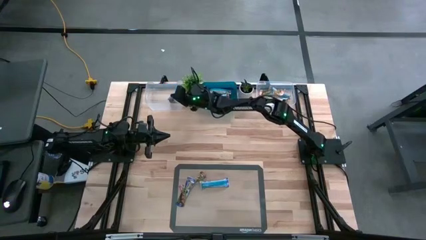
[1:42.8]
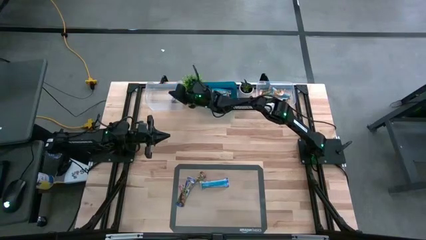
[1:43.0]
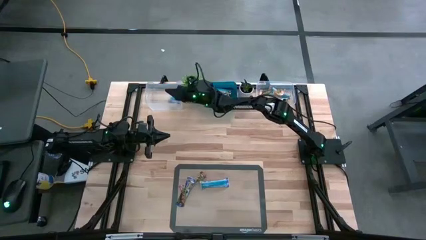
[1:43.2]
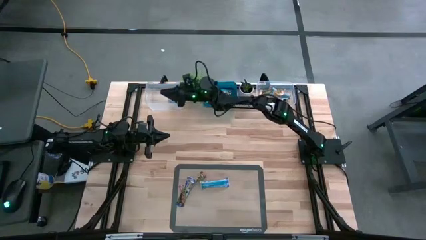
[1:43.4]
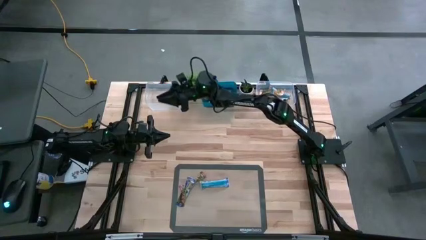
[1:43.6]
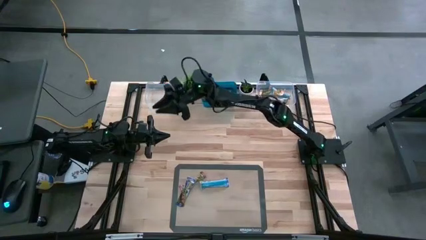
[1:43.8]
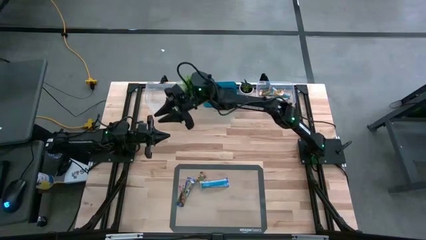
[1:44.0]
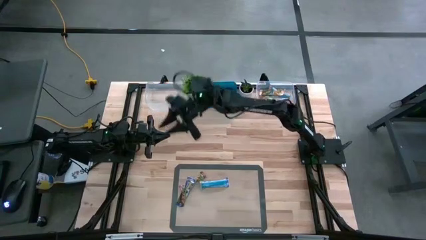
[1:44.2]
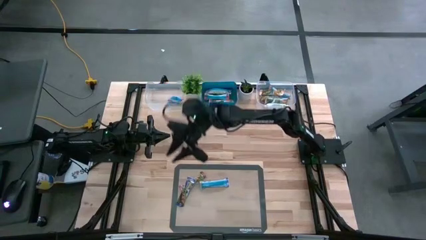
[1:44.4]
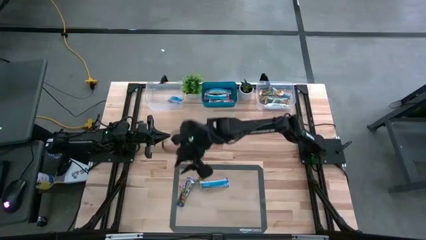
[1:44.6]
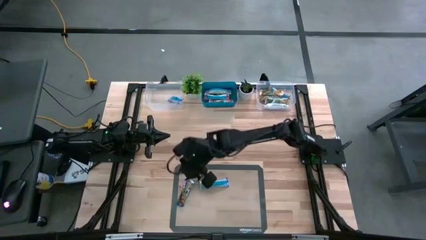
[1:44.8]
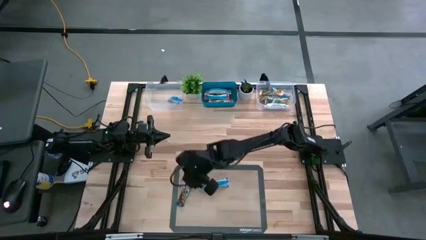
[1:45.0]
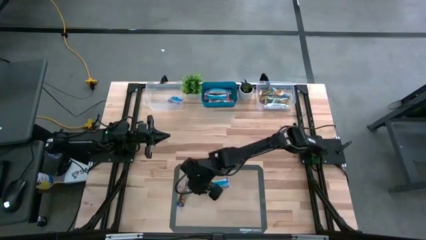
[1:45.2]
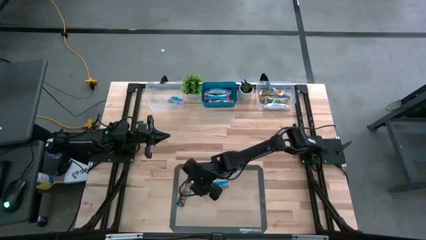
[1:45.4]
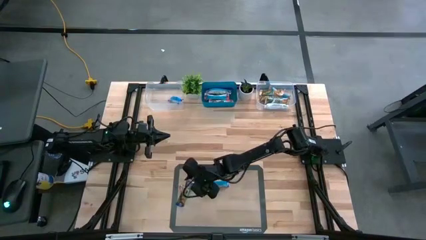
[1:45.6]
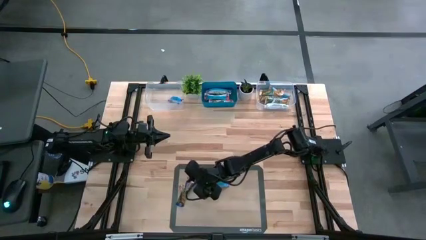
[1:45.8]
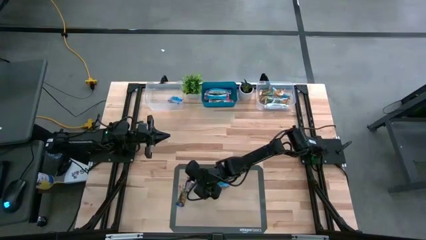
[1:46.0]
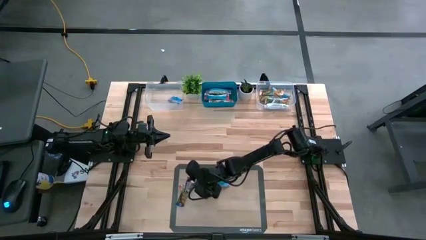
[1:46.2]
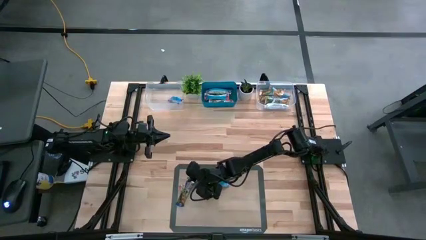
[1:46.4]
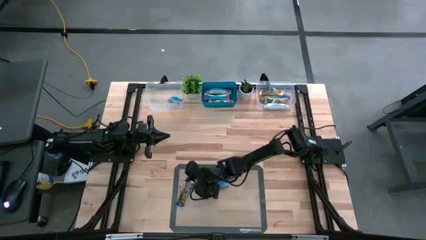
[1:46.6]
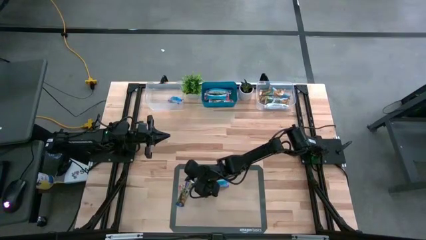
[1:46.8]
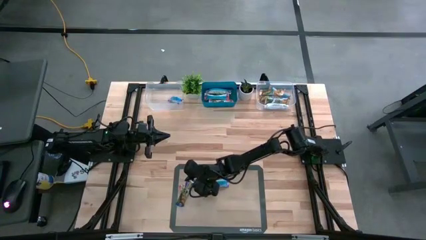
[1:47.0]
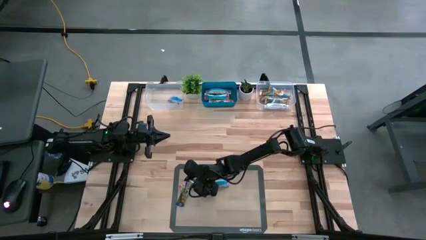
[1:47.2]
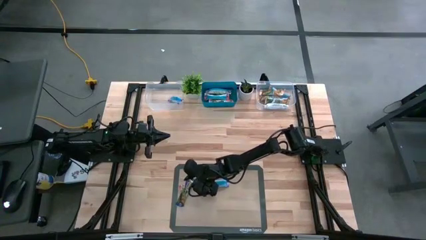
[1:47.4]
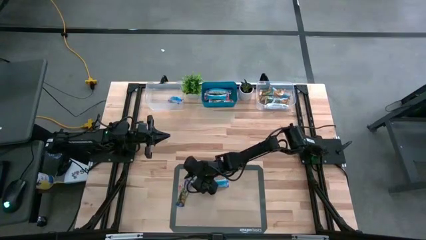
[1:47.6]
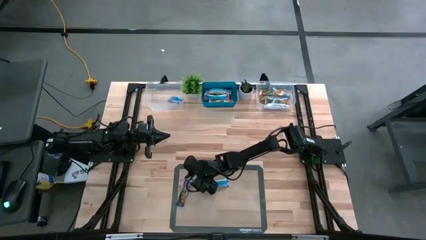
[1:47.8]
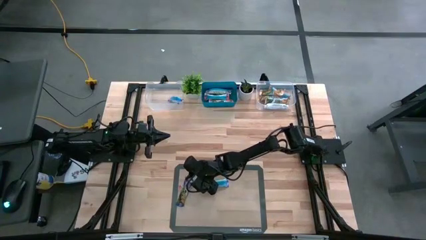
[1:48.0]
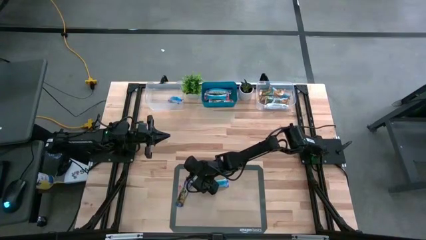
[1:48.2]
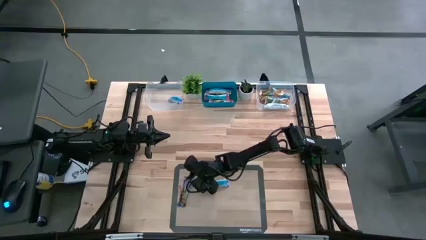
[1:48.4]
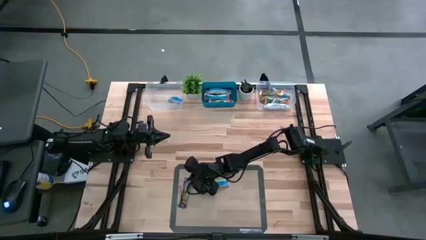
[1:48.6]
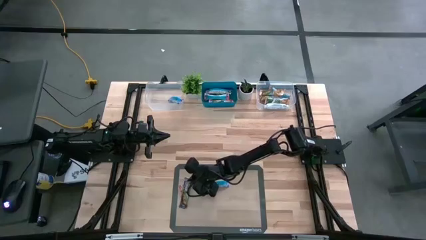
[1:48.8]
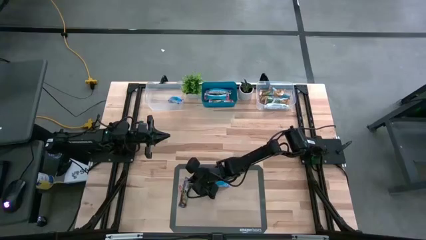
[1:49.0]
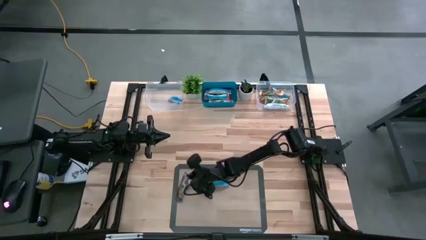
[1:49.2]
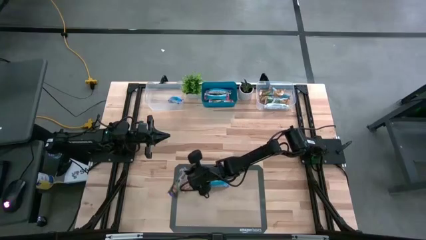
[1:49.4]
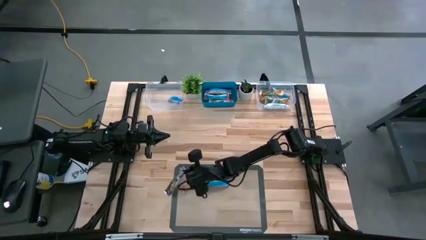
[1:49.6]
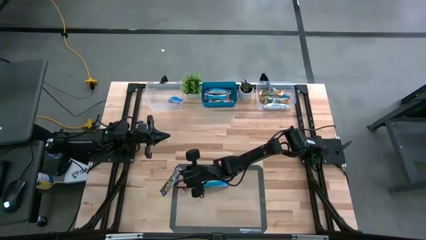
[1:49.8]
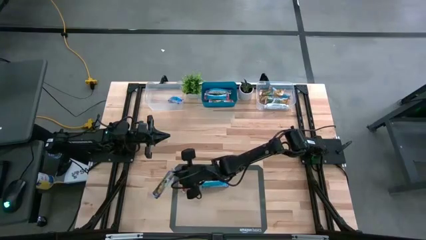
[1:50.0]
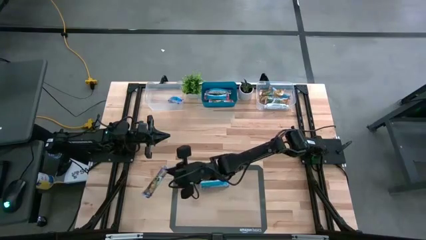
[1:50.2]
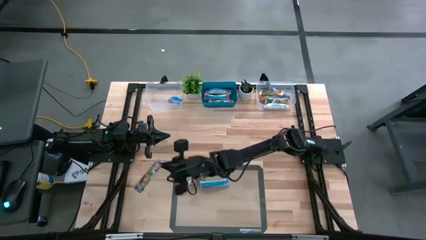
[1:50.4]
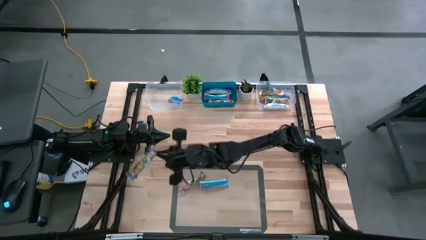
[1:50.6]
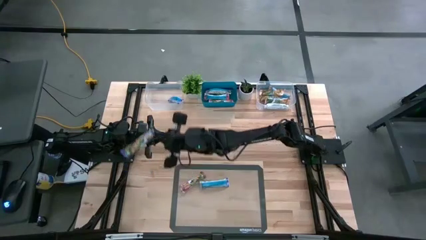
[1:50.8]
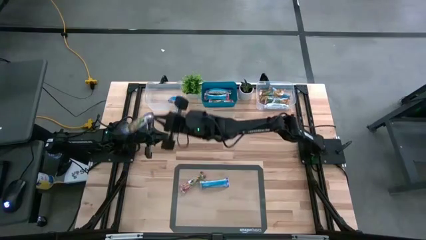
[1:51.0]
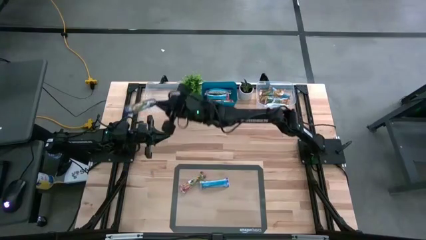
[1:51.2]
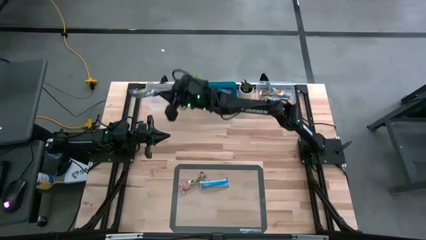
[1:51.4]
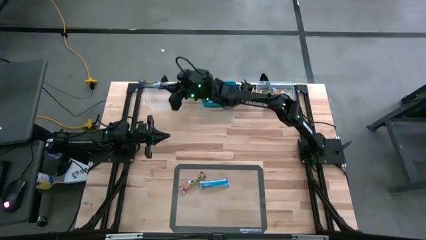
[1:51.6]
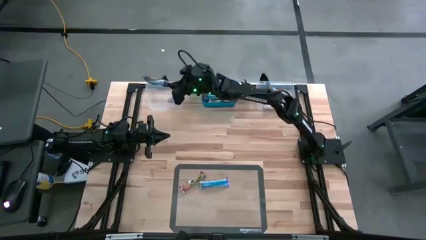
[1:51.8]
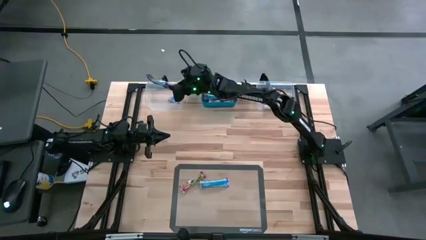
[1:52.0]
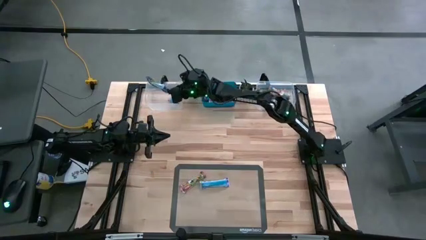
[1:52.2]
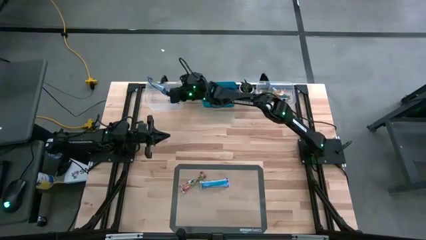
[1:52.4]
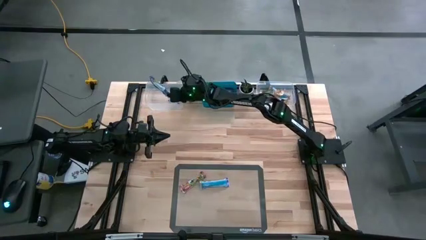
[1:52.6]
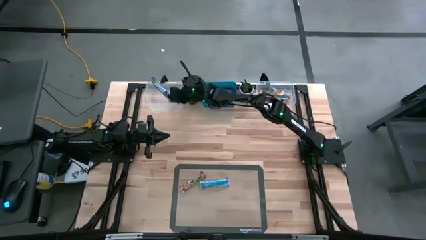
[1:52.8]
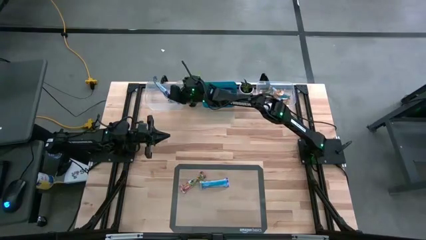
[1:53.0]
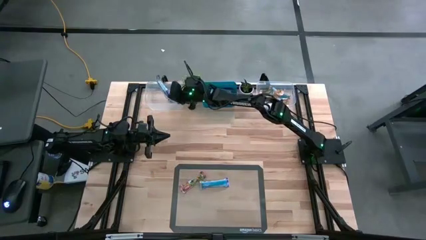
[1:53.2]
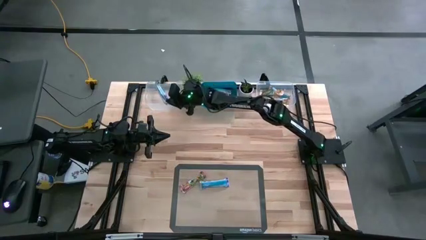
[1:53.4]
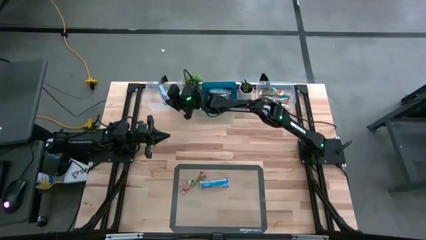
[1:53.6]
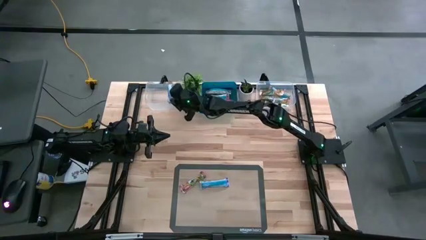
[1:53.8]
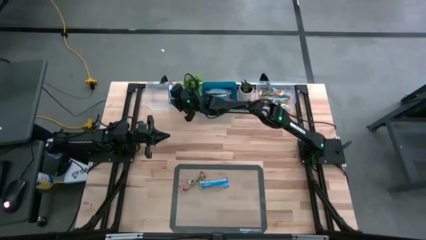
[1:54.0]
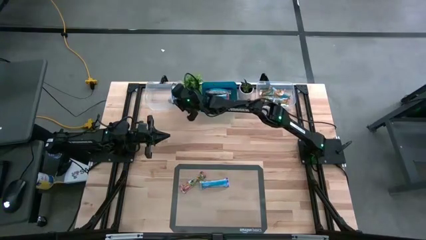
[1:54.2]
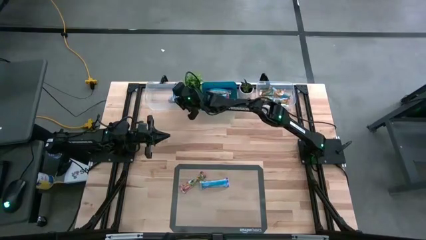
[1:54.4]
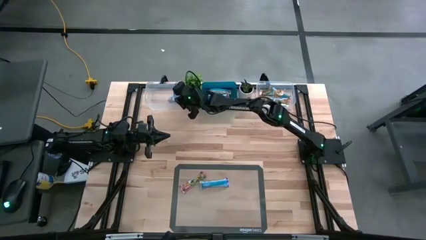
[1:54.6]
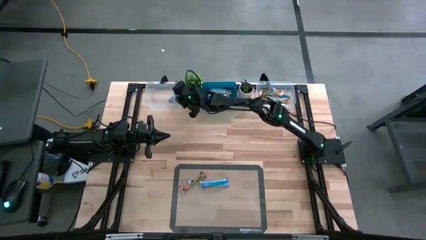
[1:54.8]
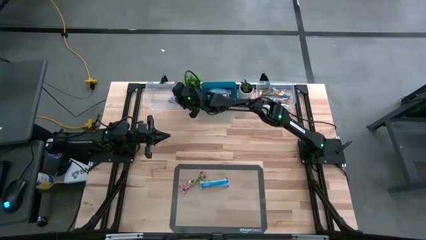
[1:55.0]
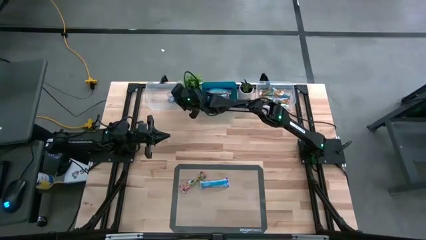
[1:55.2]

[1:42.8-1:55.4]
Task: Pick and place Granola Bars by type
Put the blue granola bar into the left transparent bin

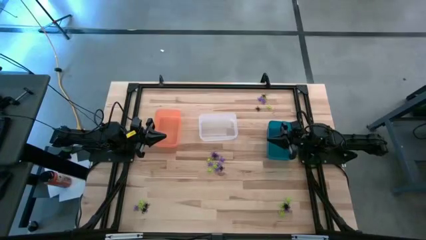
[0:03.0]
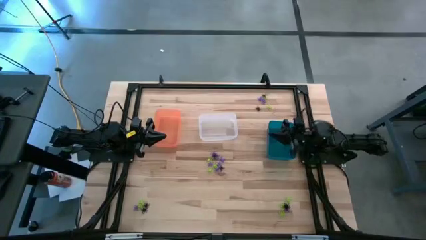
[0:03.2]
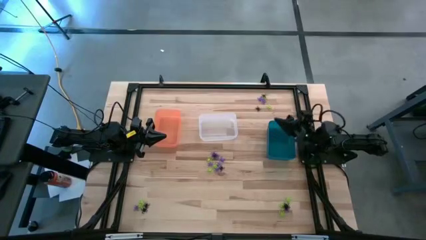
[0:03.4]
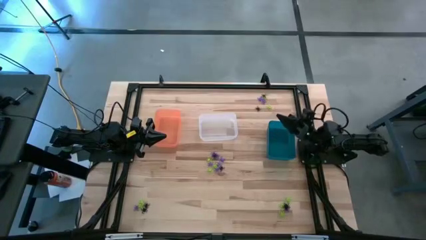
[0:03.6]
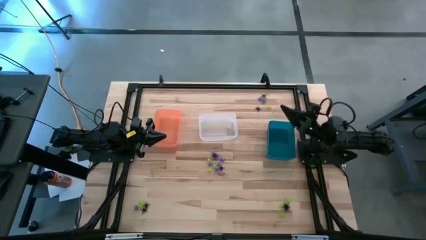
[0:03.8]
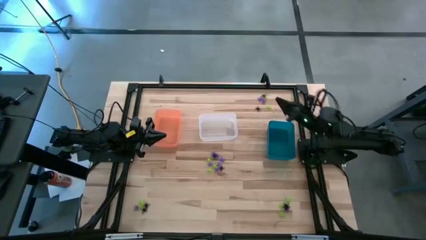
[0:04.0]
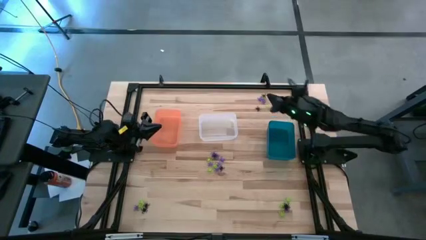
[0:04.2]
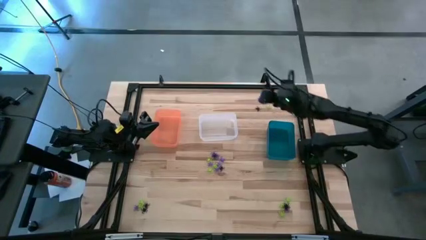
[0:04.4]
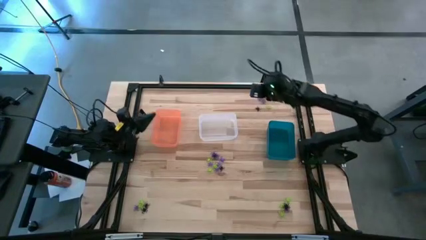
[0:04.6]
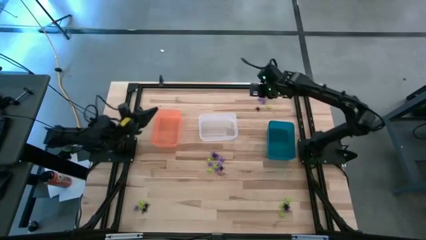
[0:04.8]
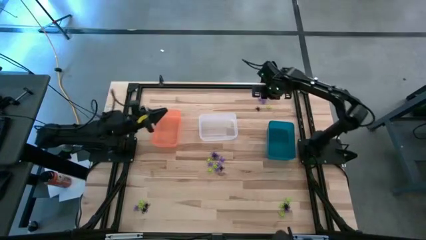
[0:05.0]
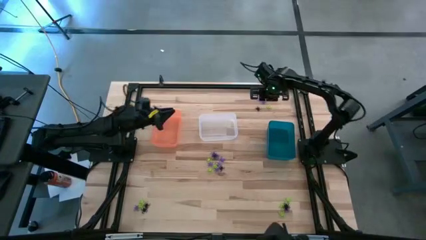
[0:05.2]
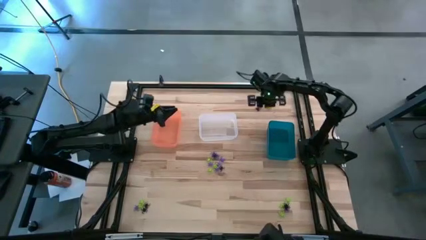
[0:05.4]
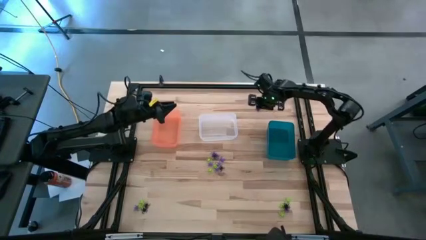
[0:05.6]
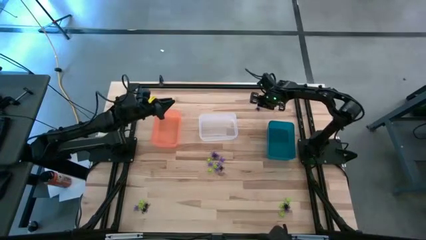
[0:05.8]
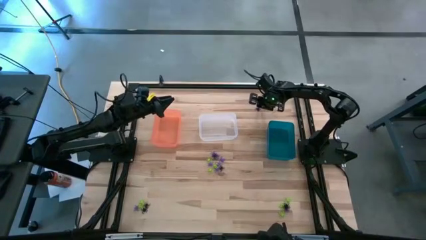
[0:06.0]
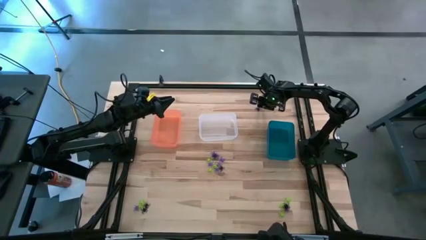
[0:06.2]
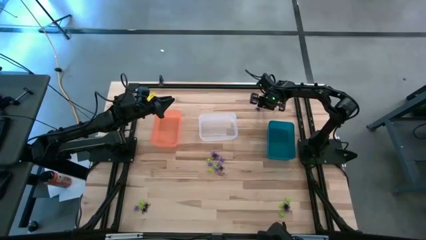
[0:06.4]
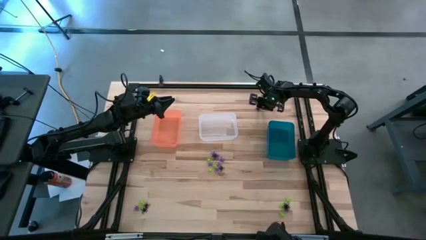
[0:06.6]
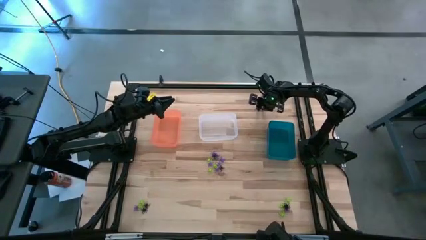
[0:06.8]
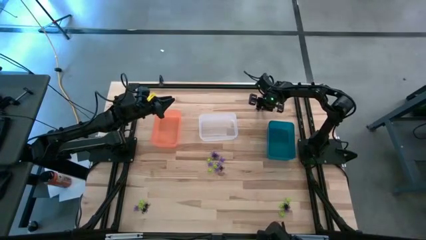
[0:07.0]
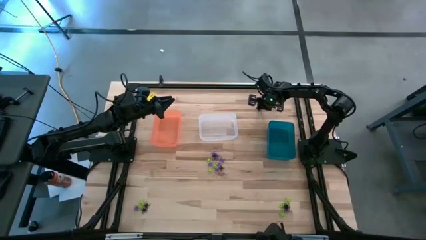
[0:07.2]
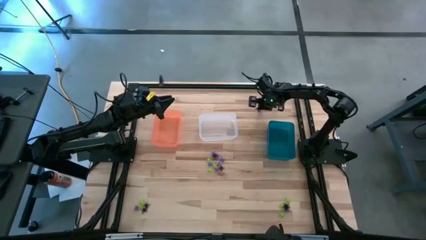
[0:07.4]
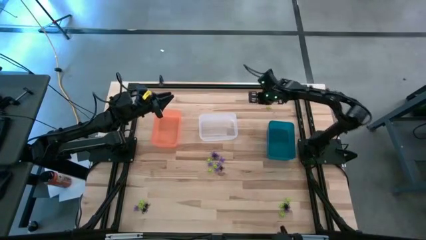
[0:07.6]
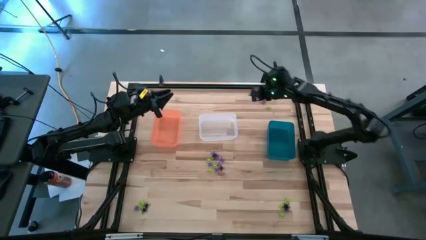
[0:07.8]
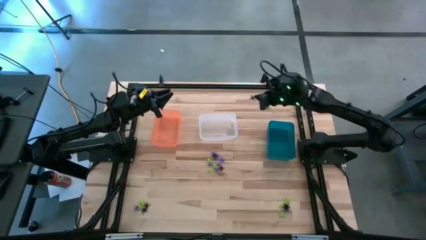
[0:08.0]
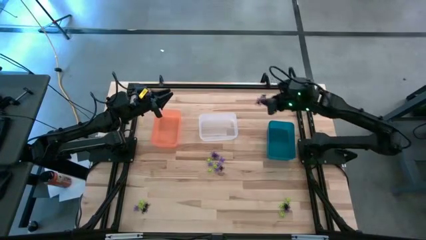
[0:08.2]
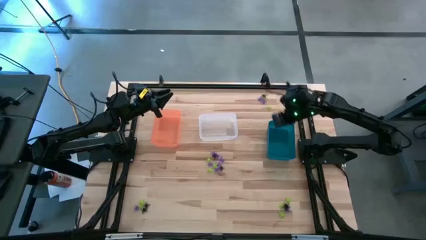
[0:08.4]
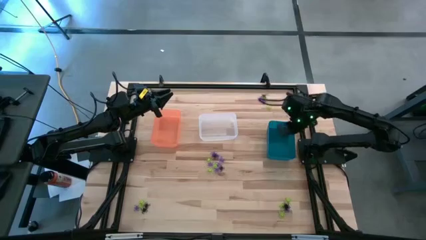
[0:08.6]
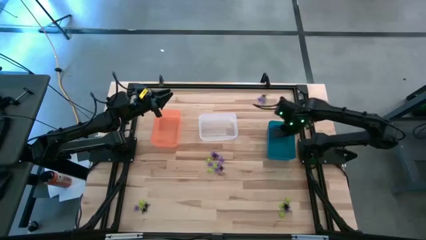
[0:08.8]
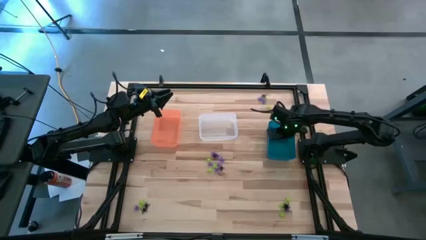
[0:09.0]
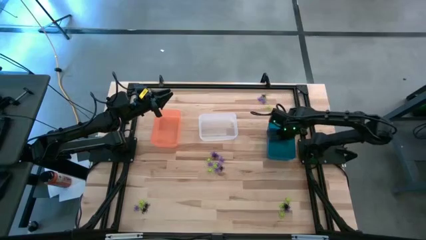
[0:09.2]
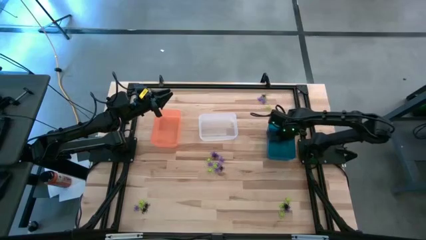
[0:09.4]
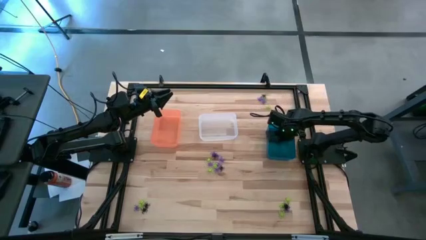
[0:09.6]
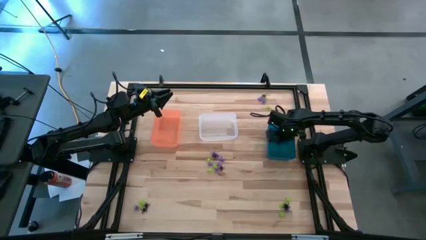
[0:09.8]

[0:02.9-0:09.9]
Task: Sort Halloween decoration
Put the black spider toy into the blue bin
